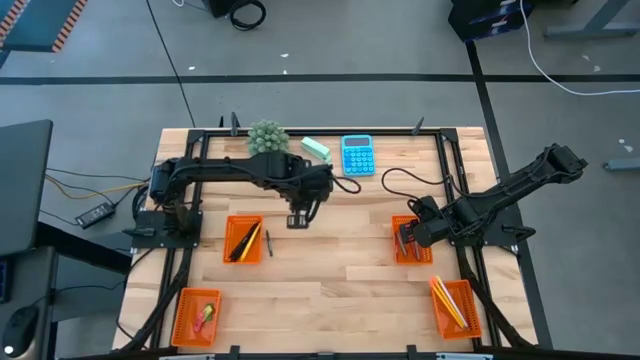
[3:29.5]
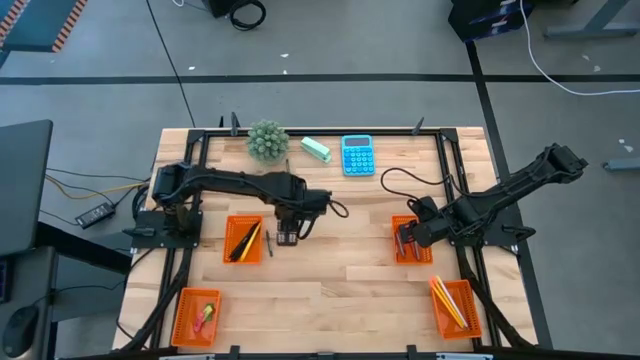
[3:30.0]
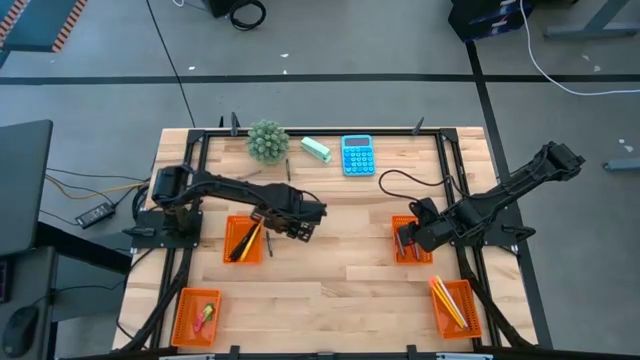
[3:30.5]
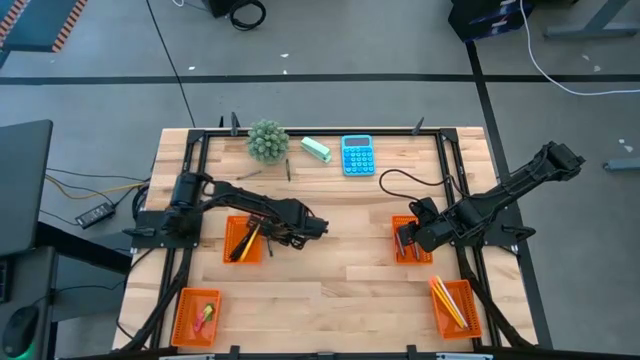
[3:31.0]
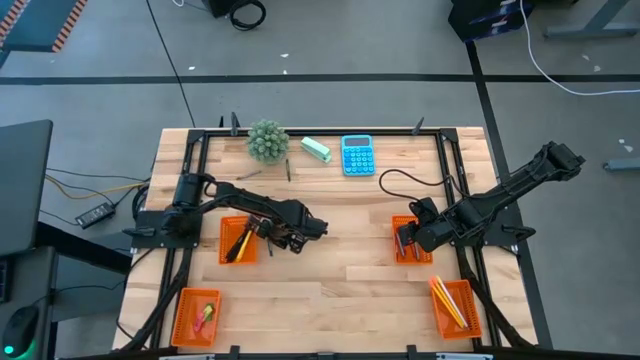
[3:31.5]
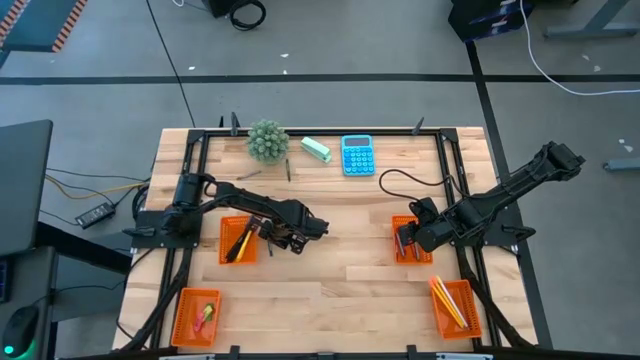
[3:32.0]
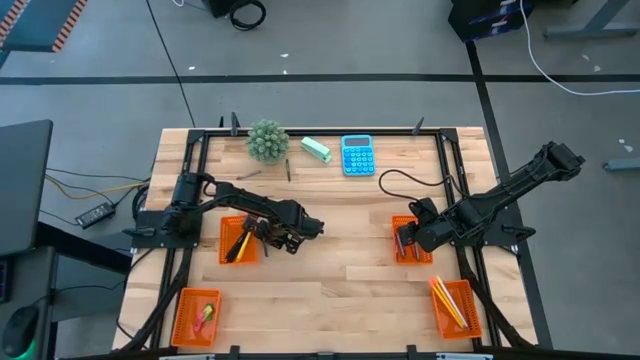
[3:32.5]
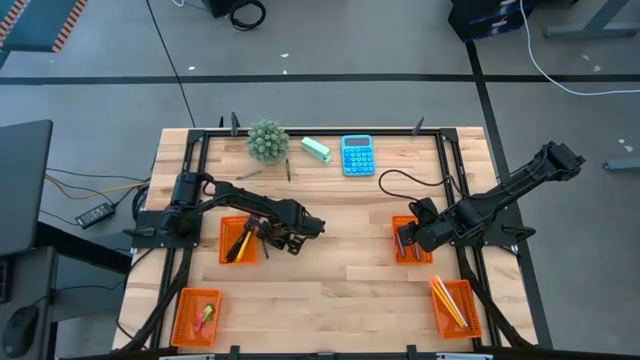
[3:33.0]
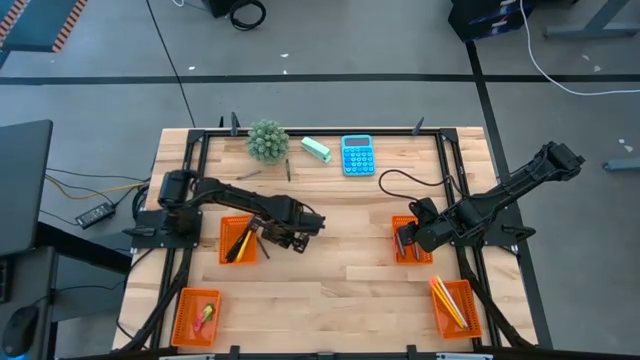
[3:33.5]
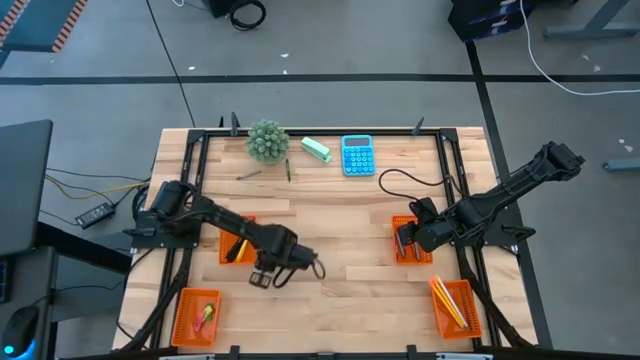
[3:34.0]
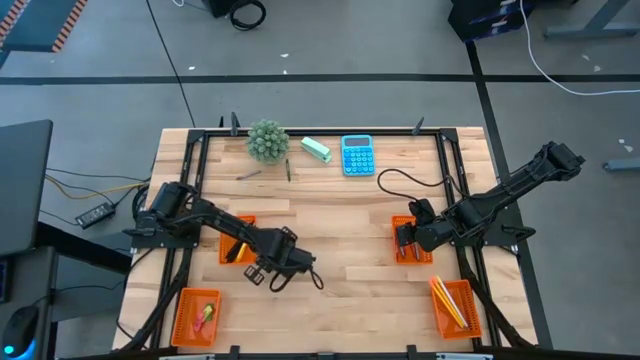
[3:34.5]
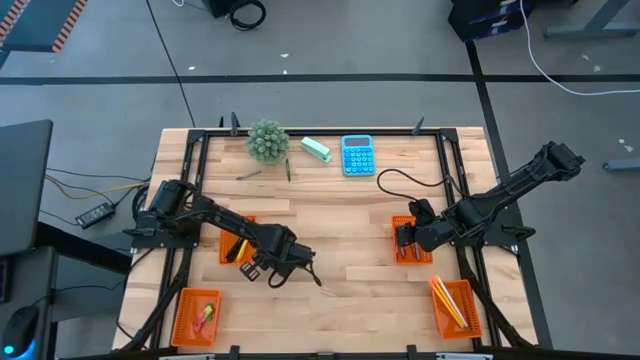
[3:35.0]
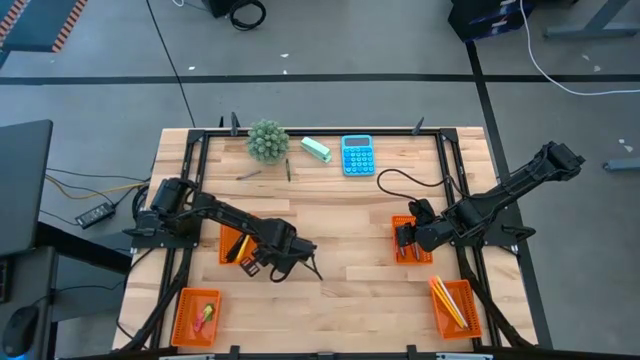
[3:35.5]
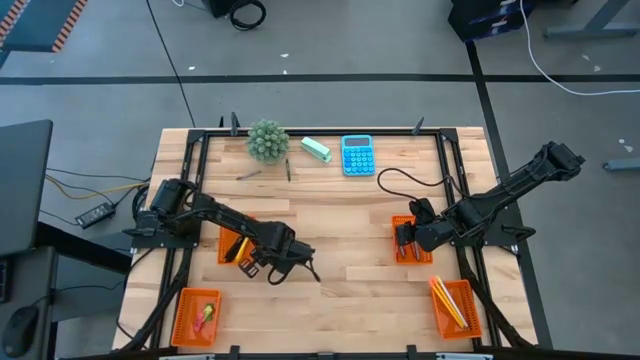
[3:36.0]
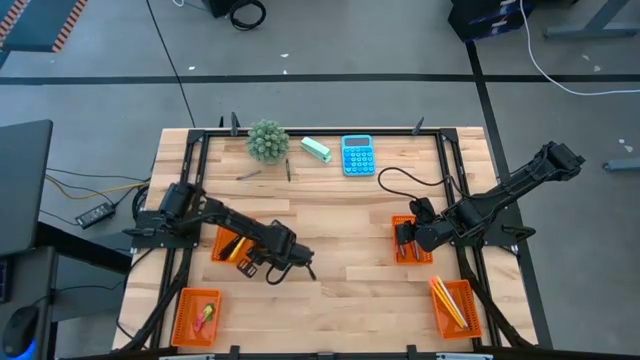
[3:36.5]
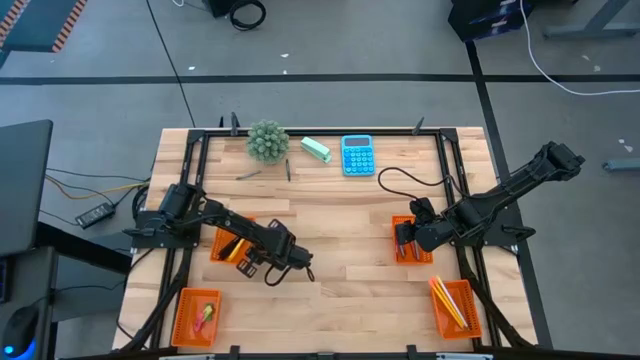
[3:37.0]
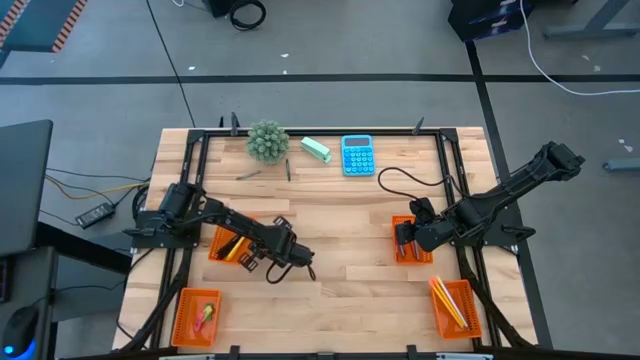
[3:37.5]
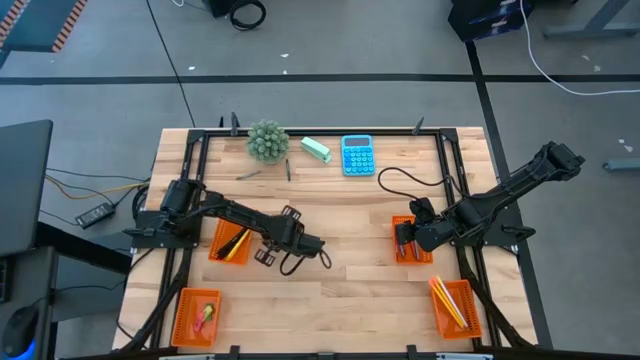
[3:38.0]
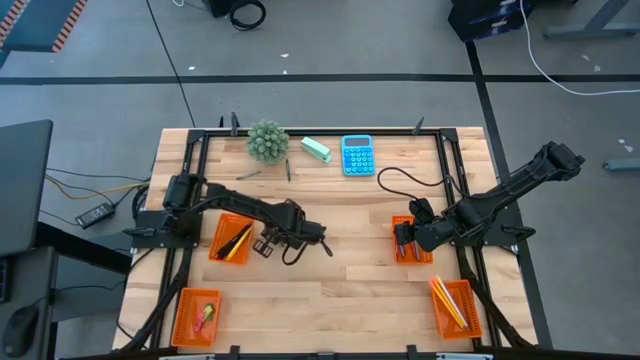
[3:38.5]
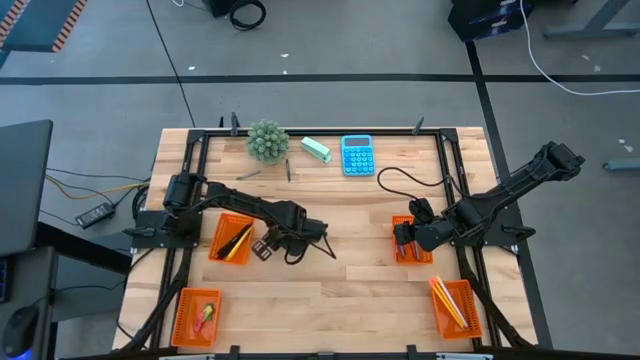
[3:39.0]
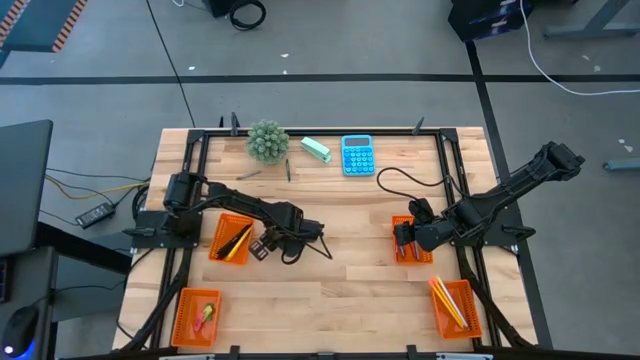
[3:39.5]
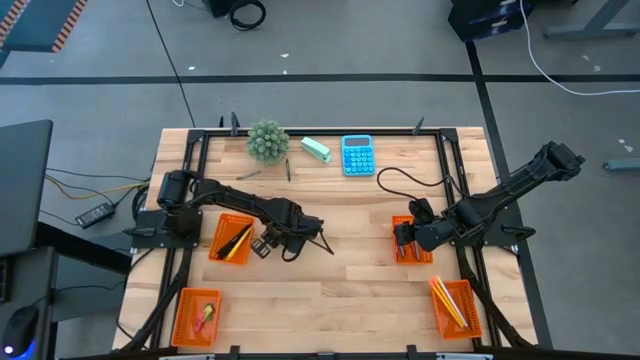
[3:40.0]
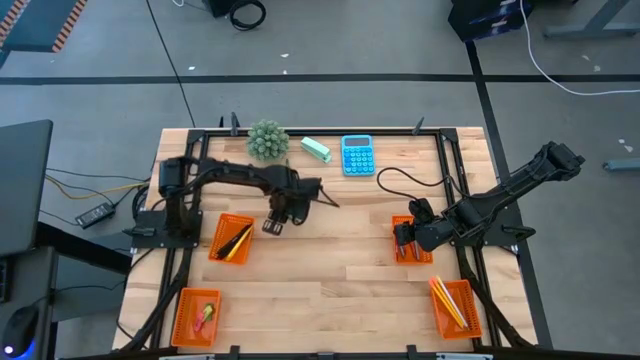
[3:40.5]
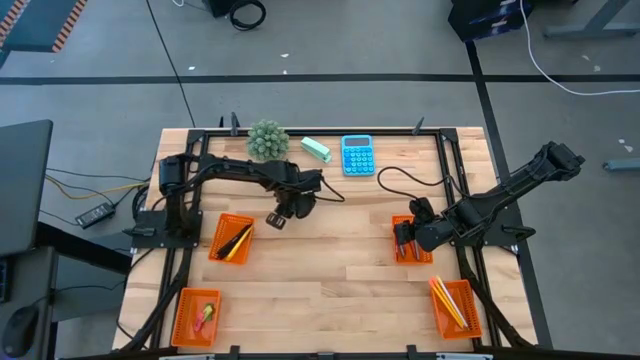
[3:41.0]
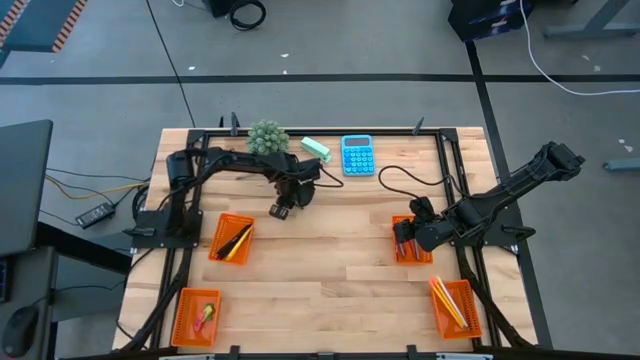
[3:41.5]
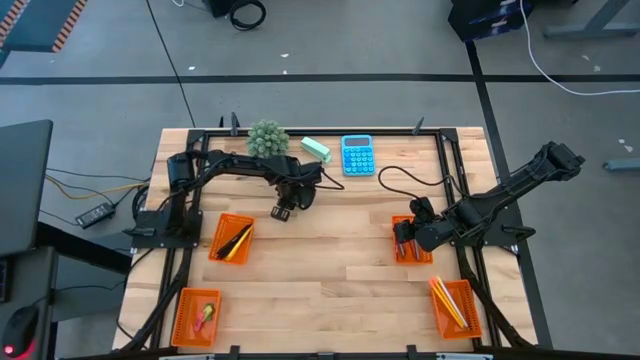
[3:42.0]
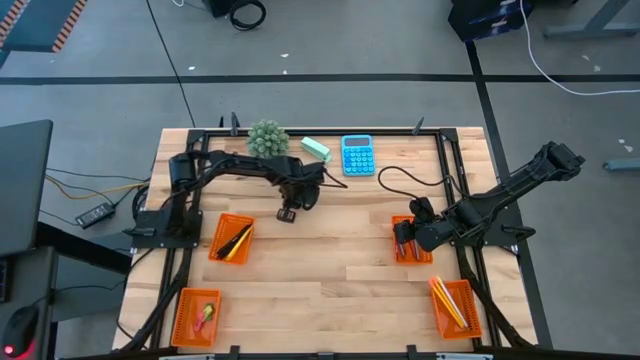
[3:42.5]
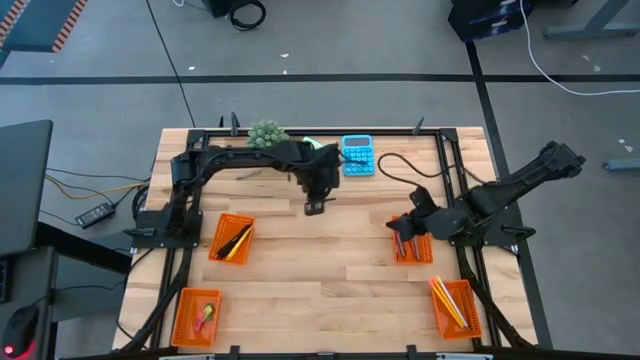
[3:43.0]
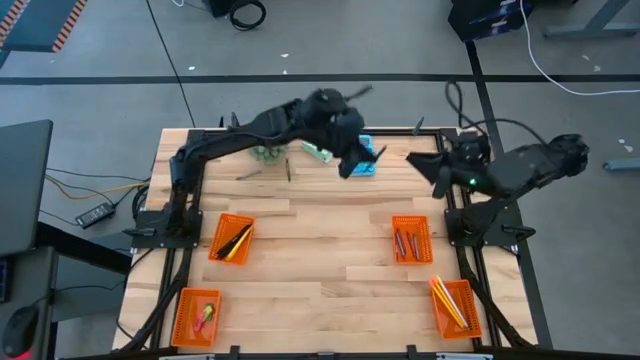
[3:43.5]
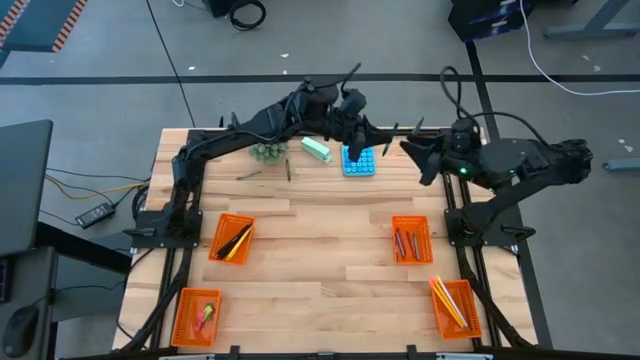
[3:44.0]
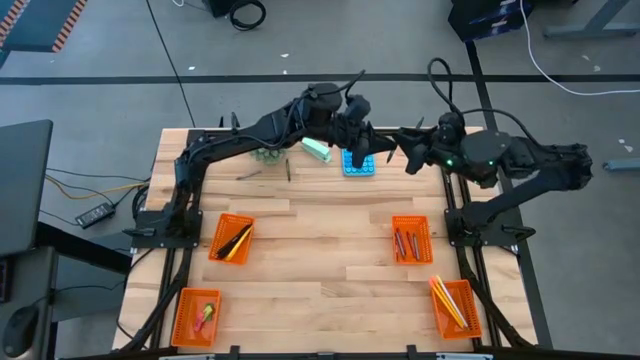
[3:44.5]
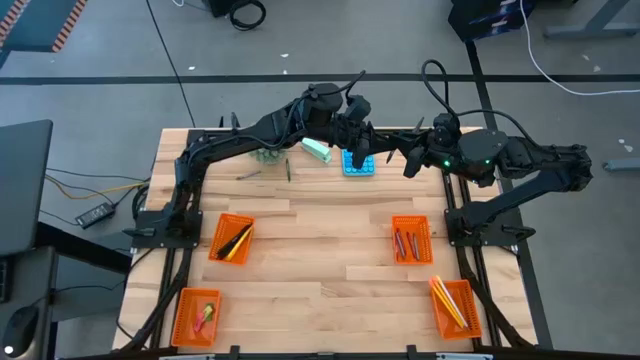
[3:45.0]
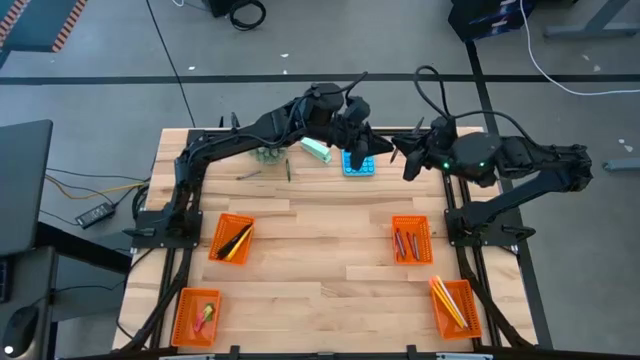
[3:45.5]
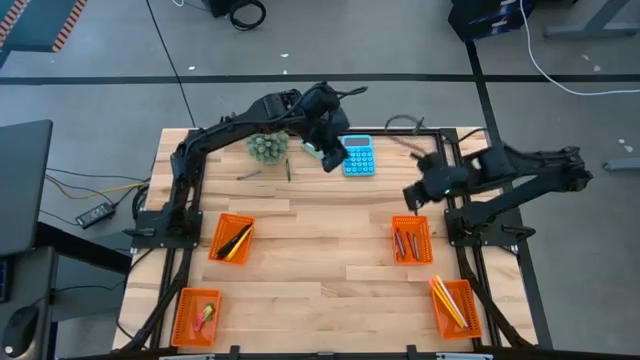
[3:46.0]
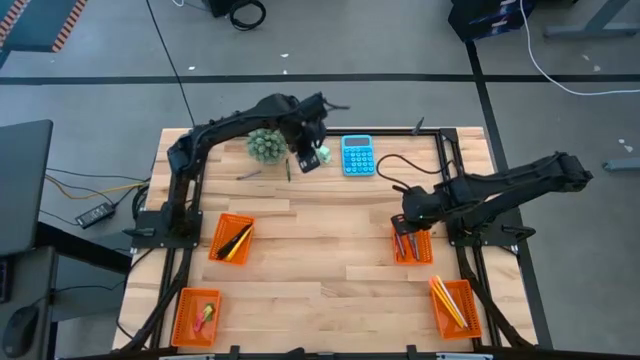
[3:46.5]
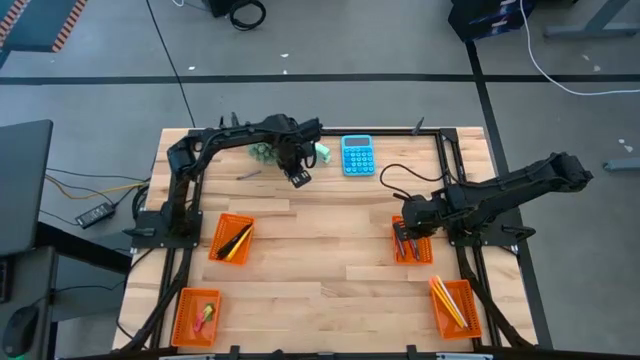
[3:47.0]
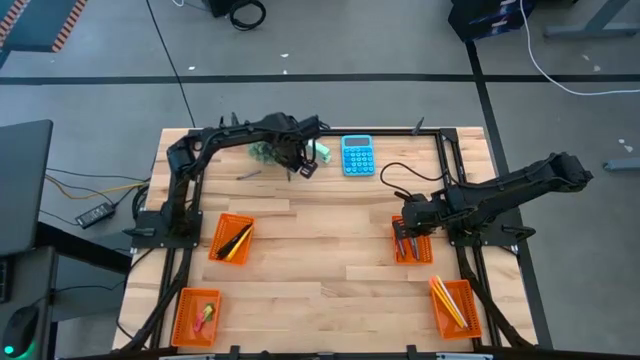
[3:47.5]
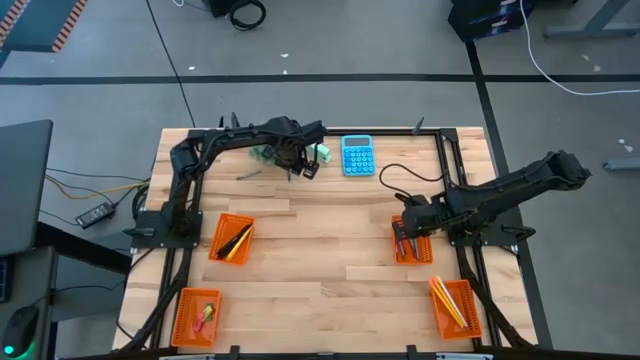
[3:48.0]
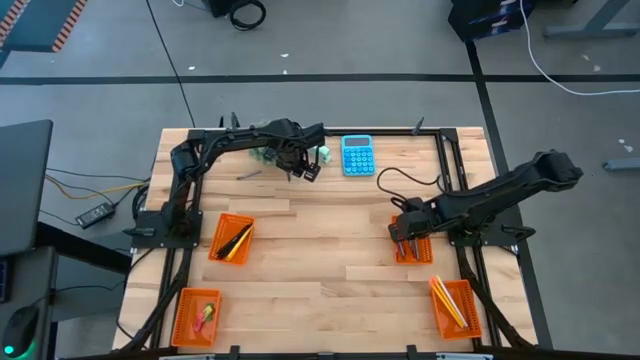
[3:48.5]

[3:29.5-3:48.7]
Task: Sort crayons/erasers/pens/pencils in bins
Put the bottom dark green crayon into the top right orange basket

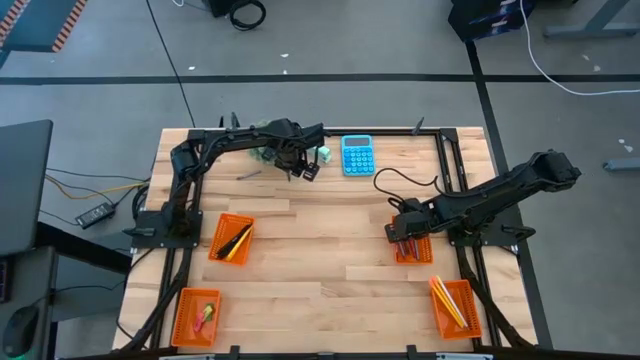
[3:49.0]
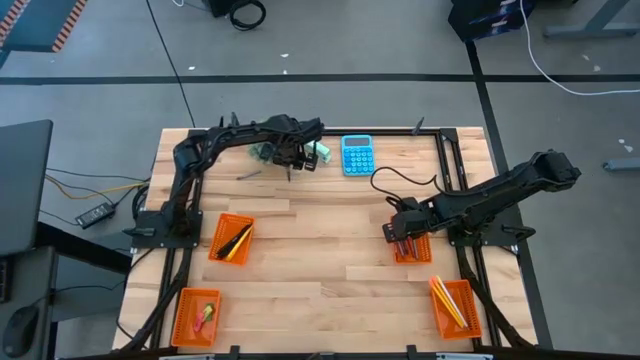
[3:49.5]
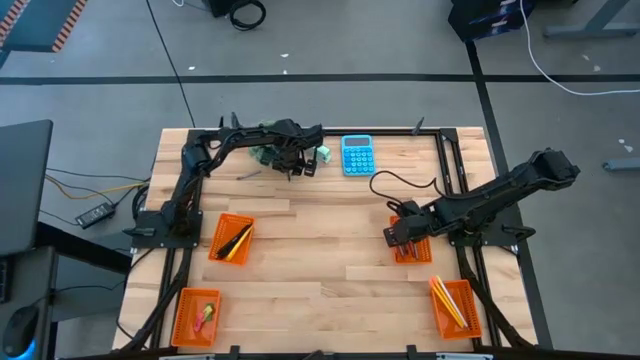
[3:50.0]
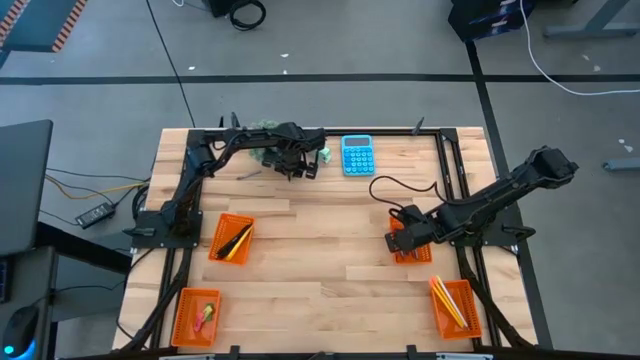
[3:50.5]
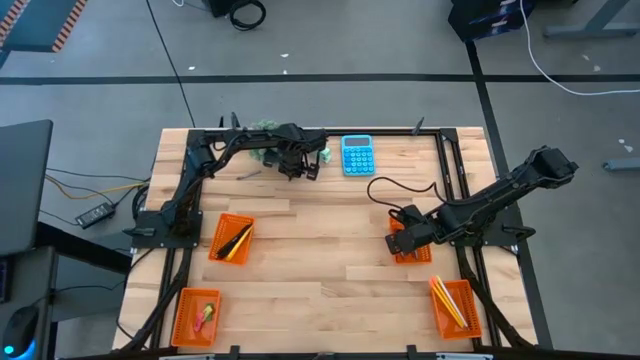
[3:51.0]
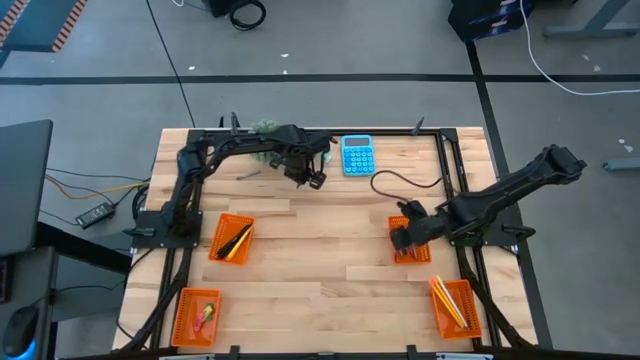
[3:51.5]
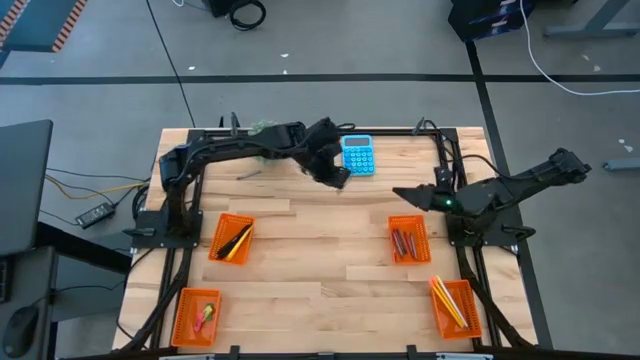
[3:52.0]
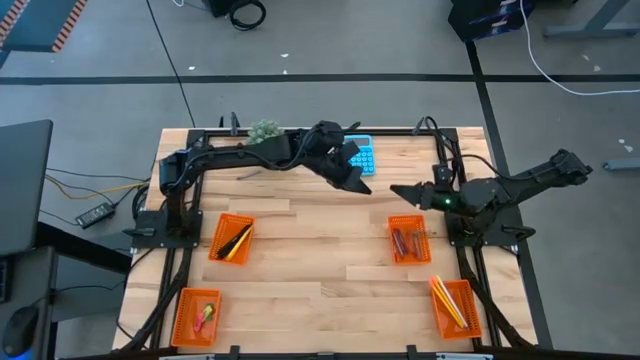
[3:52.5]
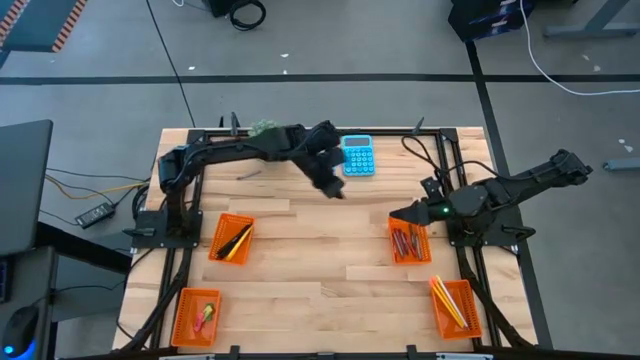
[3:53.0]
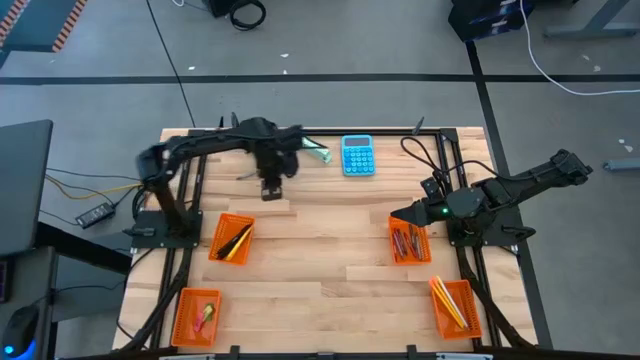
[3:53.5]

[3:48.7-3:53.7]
Put the dark green crayon into the top right orange basket
